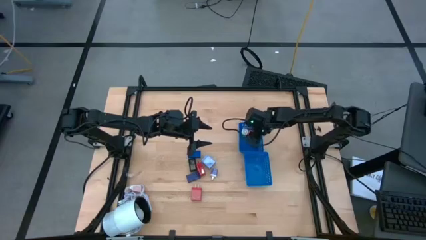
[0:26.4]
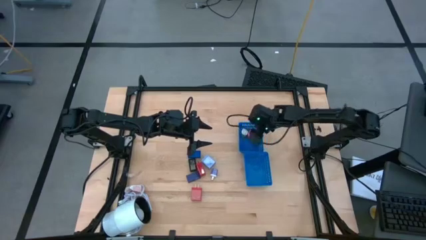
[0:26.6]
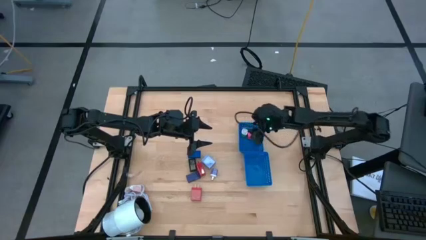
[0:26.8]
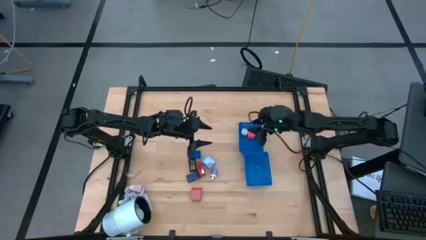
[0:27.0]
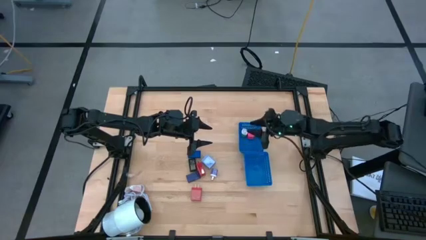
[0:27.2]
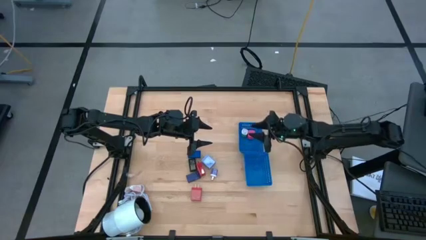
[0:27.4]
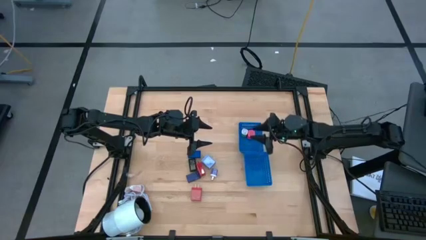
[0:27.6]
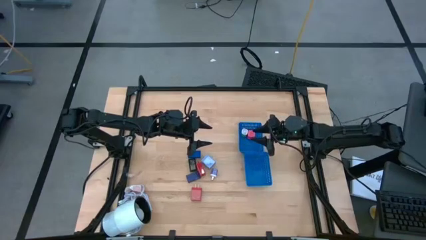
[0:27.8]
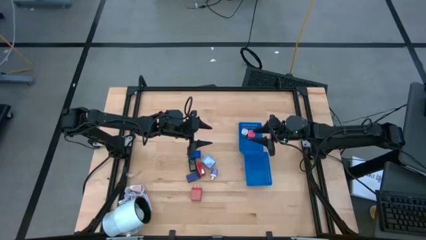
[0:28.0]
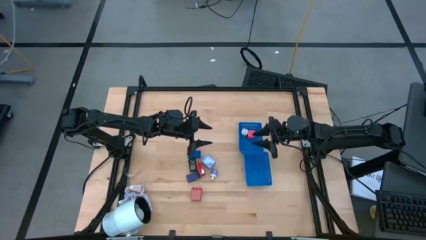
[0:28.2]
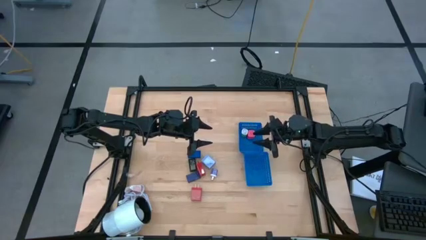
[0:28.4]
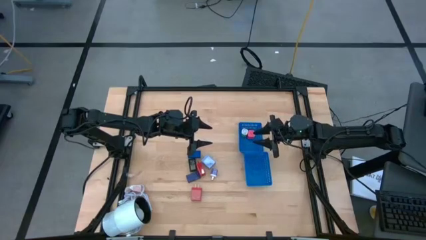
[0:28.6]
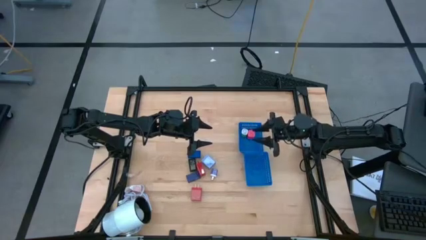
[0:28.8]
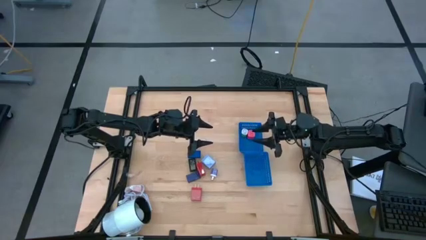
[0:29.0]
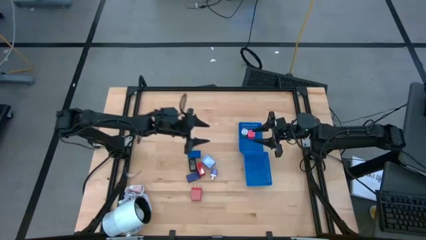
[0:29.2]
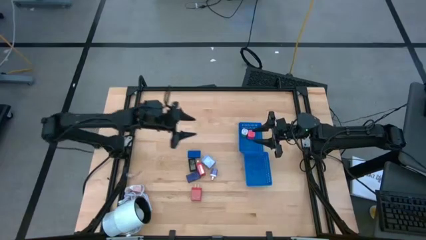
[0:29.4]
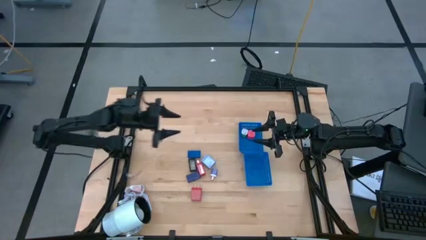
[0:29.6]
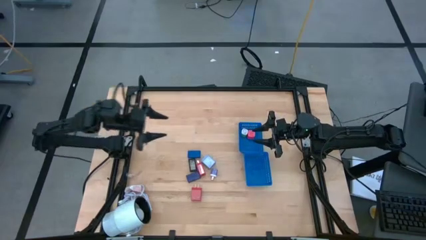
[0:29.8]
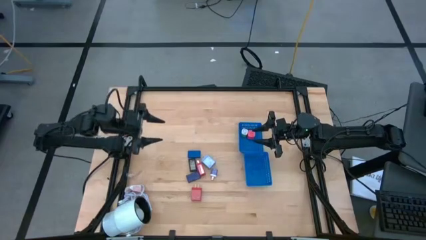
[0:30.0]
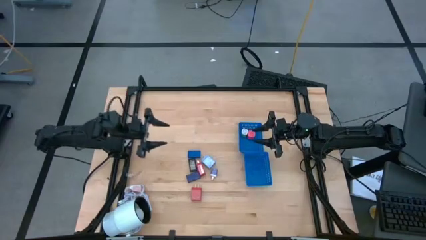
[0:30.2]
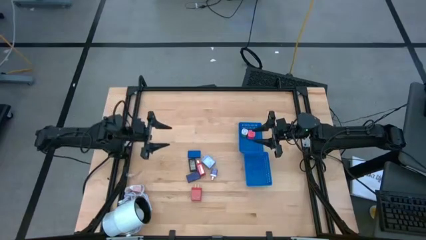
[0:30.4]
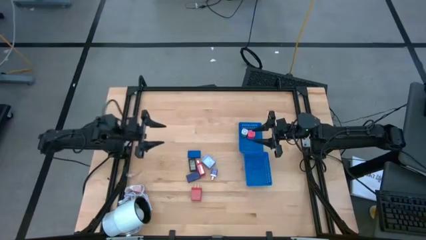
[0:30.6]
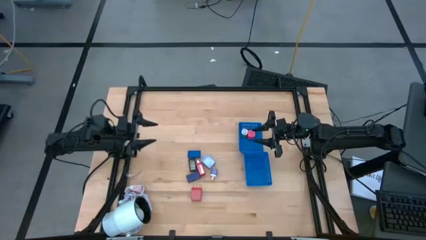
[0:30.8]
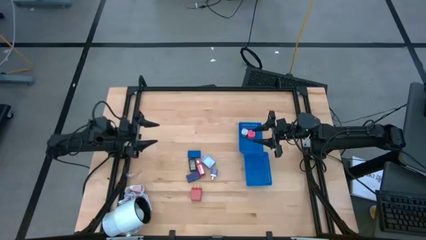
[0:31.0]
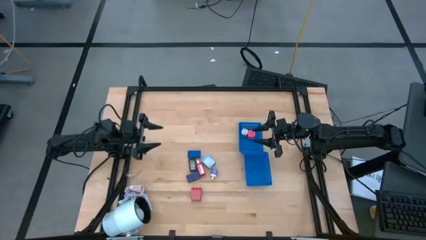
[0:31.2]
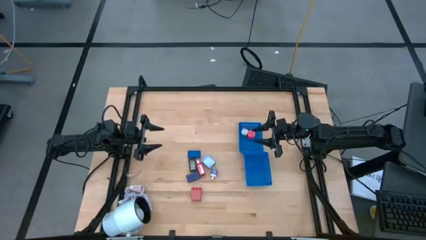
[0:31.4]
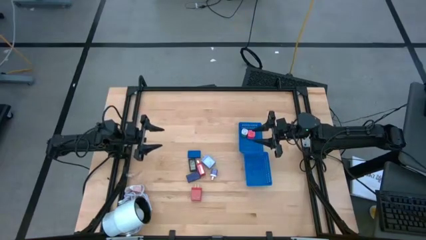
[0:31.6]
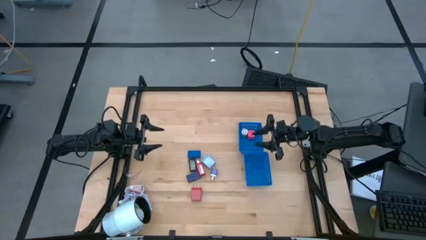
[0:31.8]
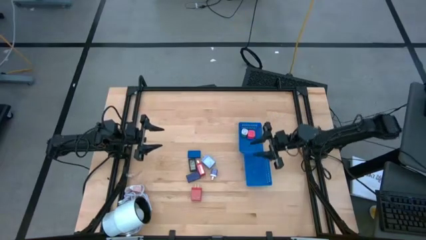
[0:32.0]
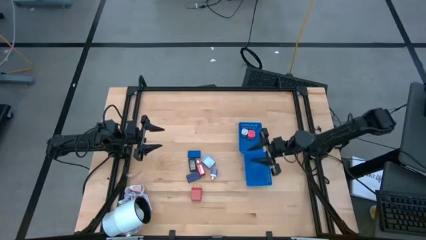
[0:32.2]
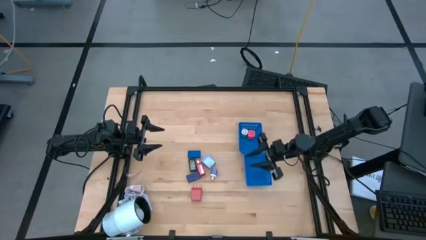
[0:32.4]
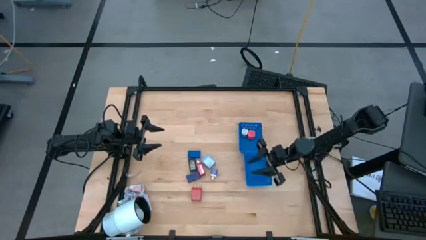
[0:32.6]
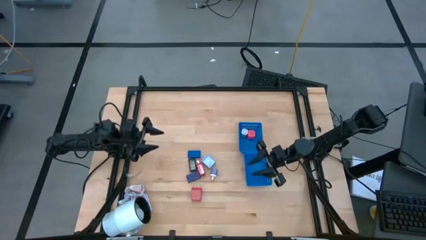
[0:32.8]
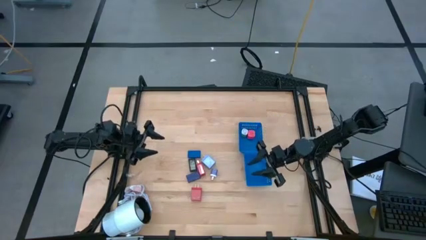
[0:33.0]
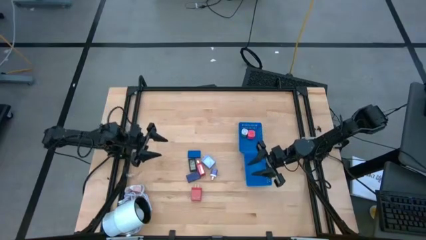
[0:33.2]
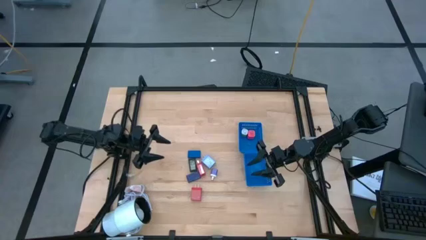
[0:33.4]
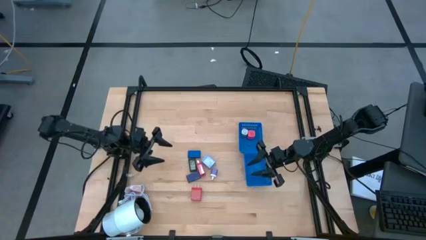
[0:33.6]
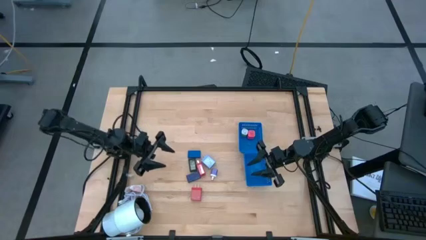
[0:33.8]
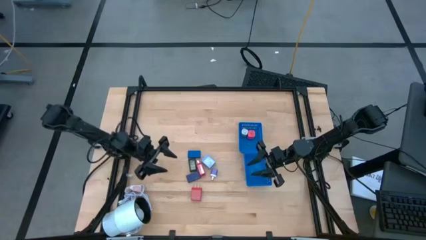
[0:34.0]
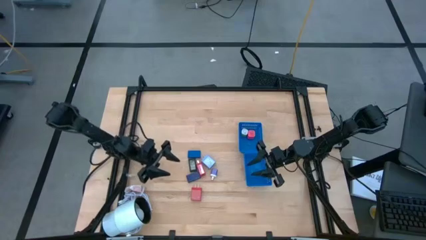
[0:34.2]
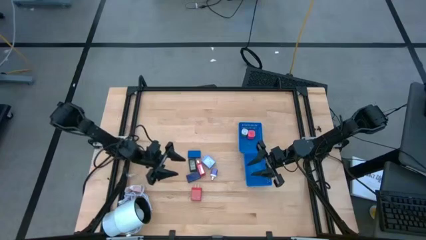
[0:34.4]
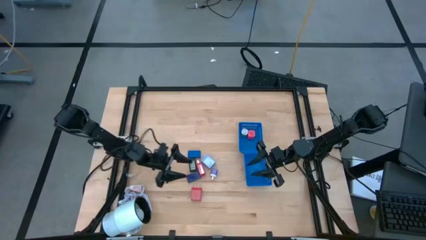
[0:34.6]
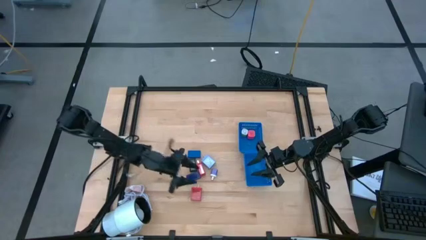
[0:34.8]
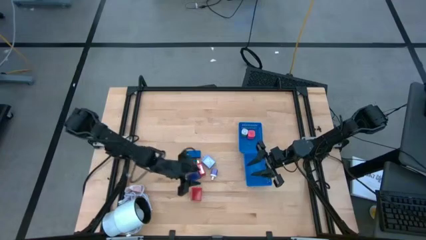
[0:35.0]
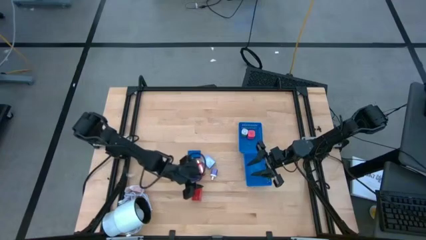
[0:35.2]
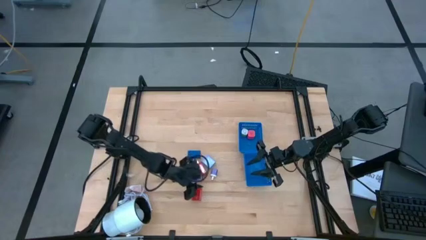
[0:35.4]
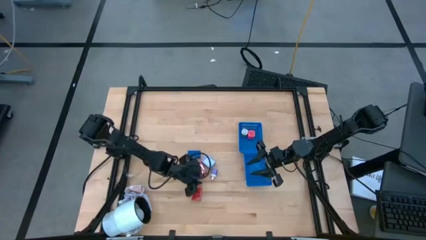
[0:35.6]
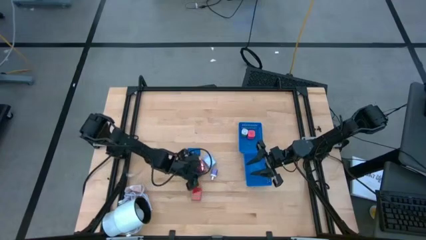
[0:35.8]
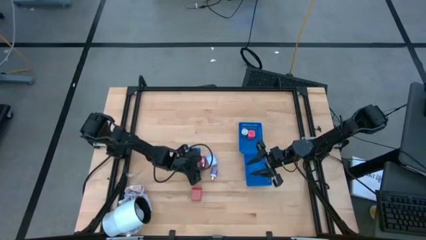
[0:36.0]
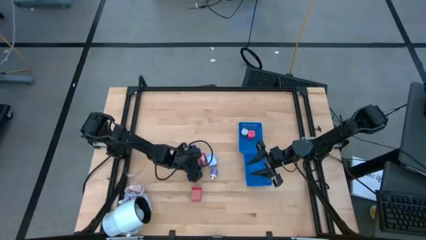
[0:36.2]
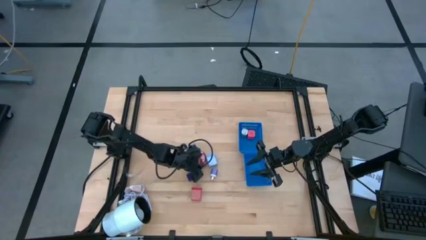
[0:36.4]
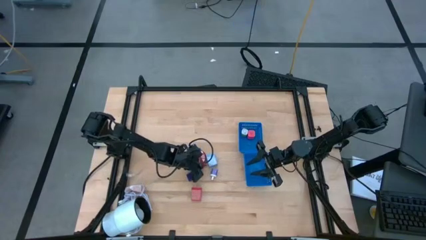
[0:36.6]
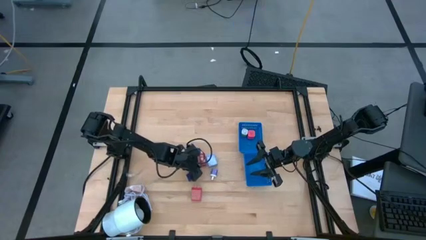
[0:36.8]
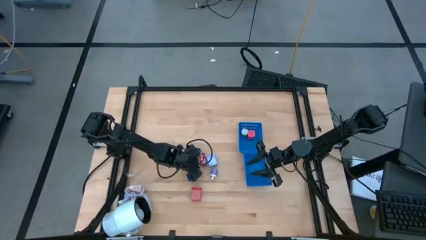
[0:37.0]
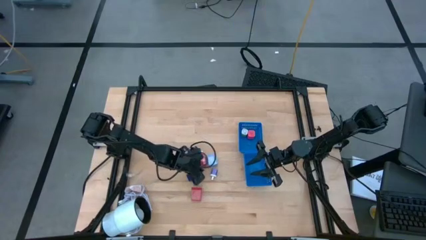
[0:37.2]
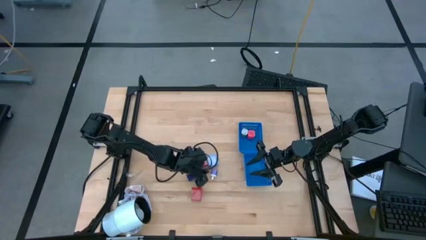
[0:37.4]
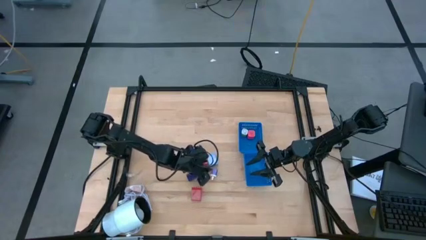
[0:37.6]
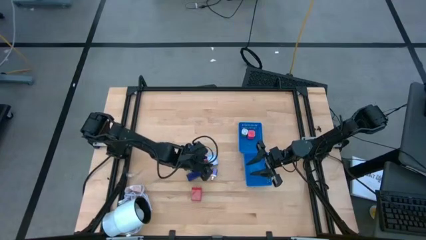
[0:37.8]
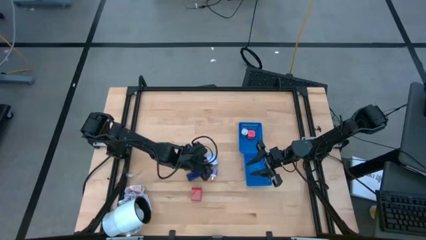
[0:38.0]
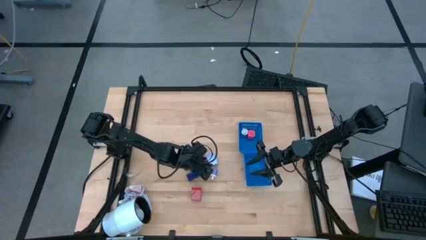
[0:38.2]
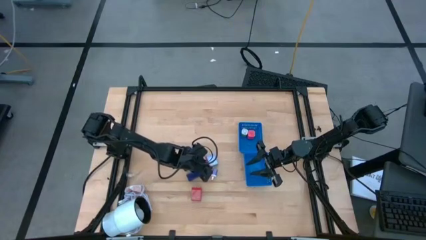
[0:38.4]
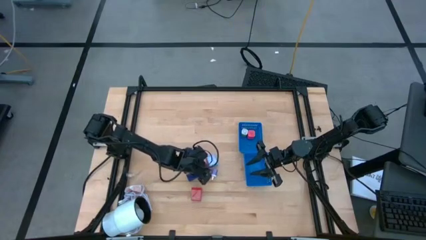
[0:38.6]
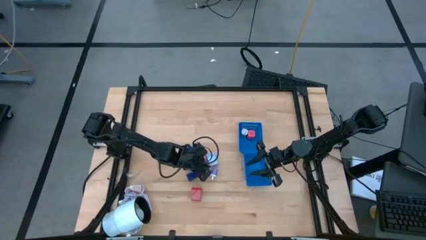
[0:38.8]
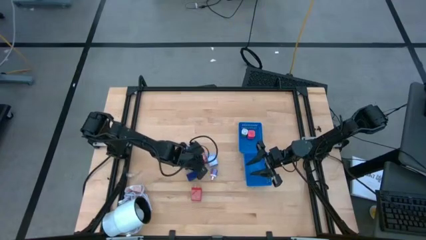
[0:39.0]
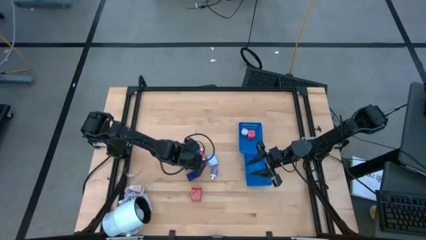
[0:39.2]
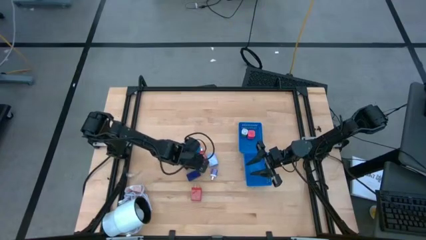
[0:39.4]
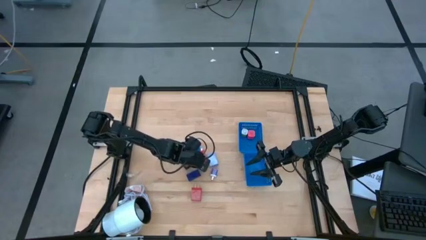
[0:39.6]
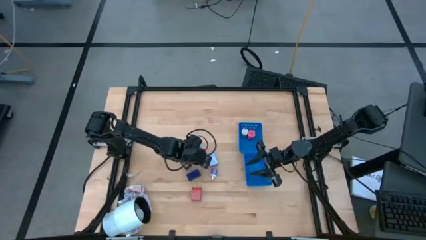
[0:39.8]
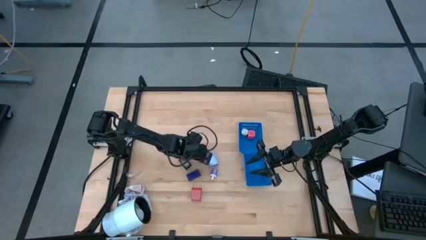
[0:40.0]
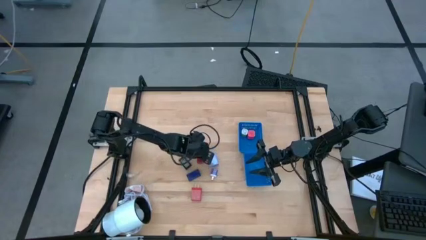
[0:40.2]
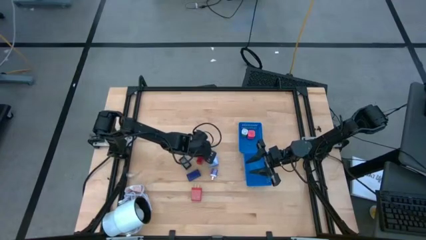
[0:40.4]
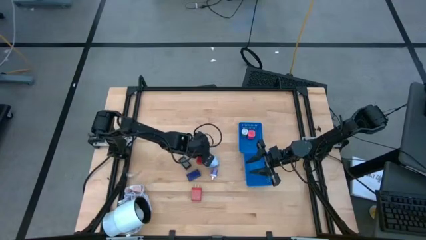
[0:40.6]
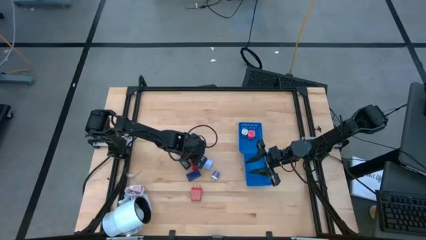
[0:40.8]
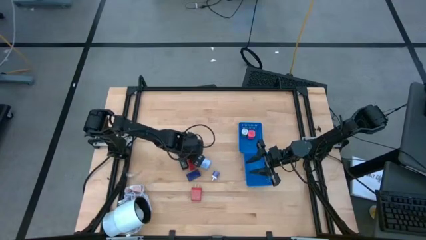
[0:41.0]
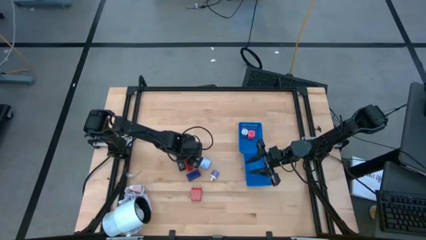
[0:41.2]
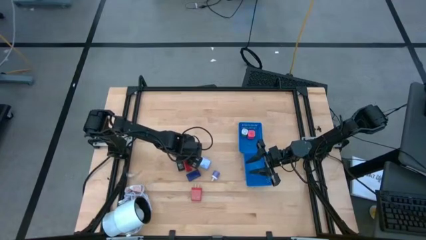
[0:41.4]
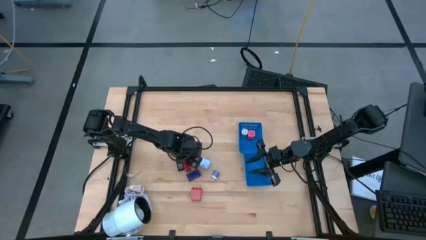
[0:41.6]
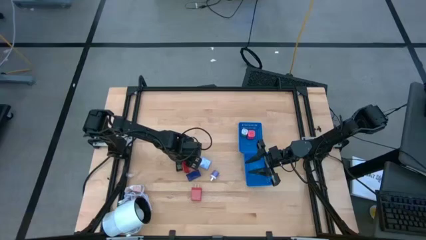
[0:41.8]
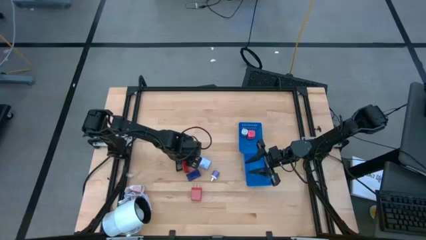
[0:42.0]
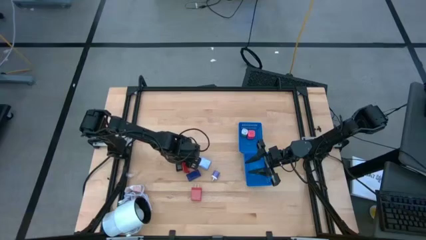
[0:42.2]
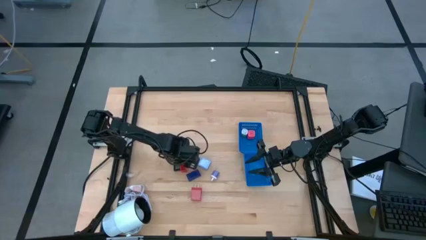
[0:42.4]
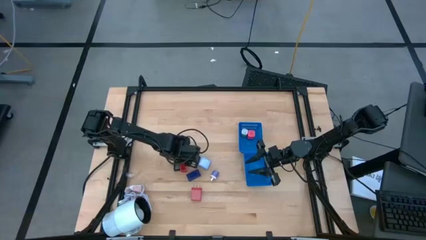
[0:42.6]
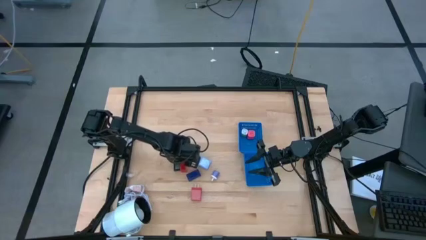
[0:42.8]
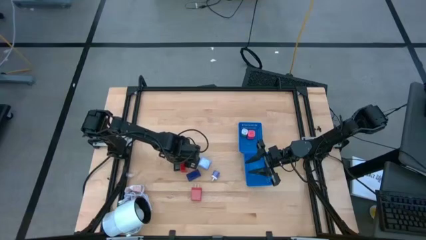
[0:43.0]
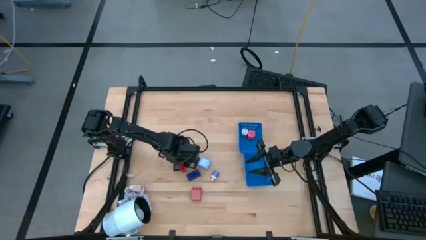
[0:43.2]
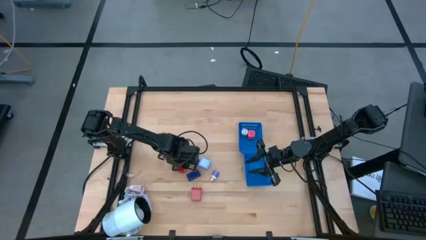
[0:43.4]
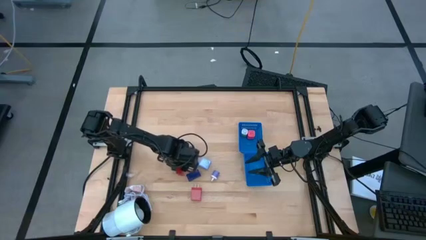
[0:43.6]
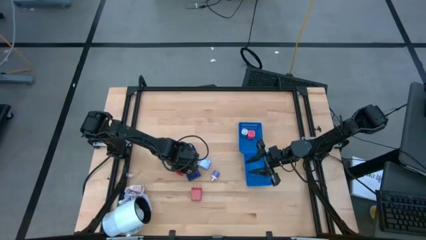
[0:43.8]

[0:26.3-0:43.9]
Task: Pick & Place Office items
Put the red charger adapter into the top blue bin
